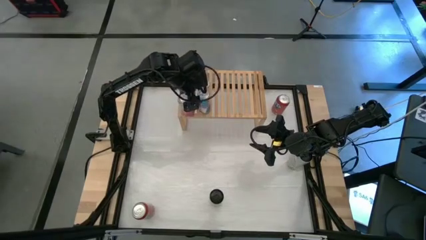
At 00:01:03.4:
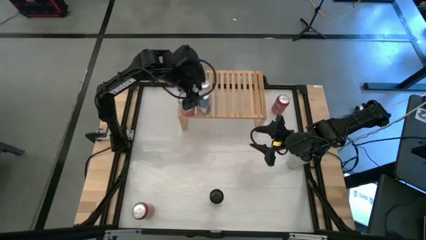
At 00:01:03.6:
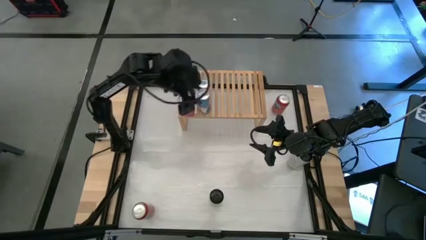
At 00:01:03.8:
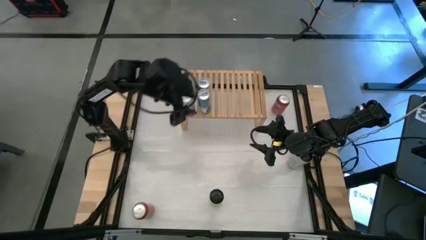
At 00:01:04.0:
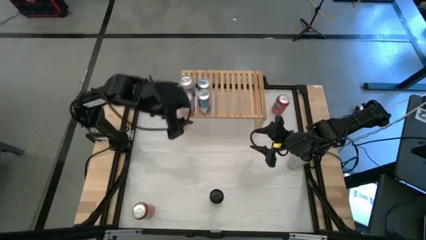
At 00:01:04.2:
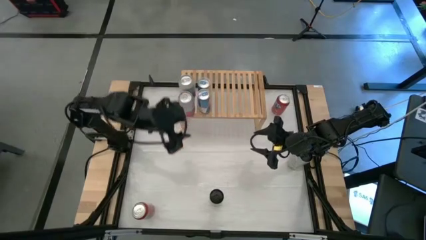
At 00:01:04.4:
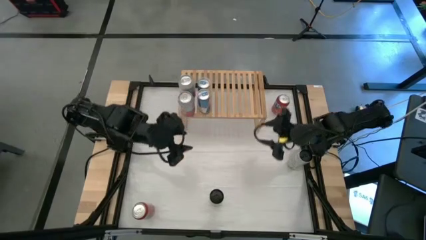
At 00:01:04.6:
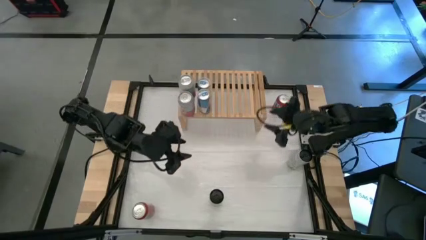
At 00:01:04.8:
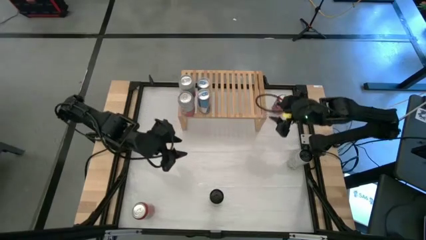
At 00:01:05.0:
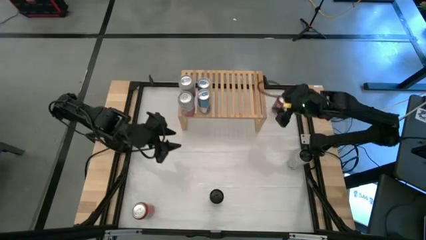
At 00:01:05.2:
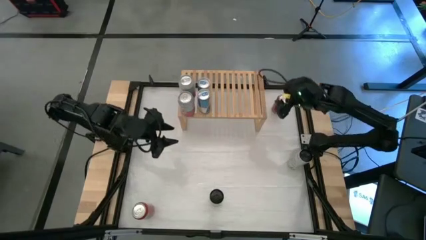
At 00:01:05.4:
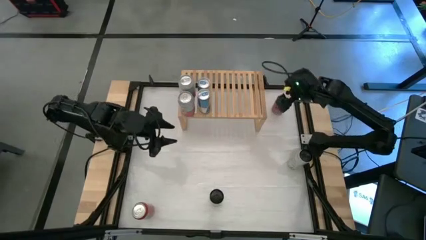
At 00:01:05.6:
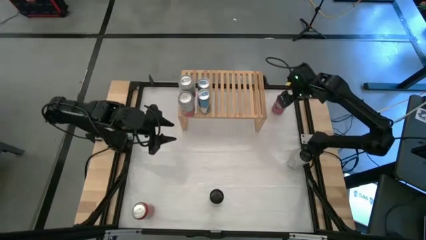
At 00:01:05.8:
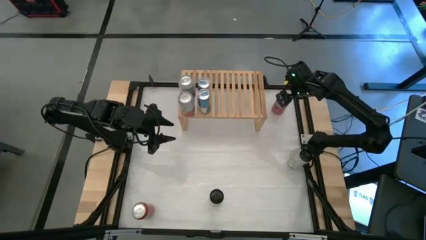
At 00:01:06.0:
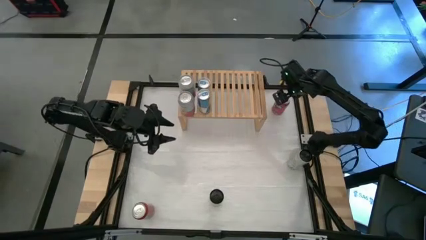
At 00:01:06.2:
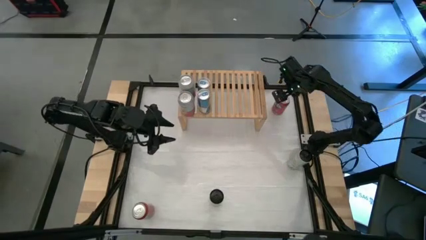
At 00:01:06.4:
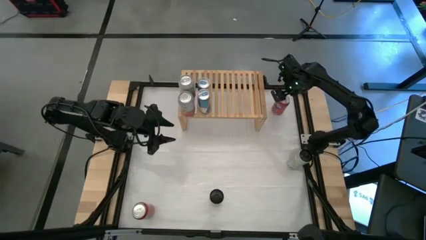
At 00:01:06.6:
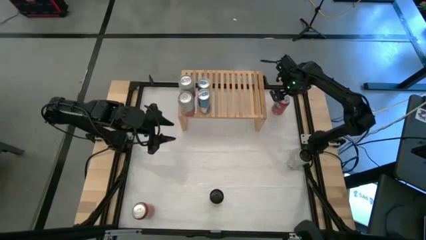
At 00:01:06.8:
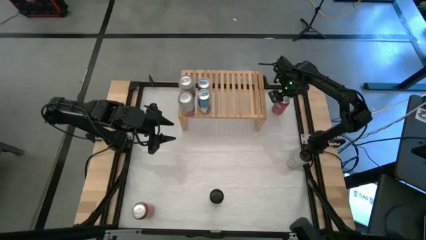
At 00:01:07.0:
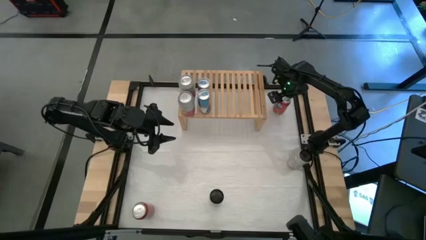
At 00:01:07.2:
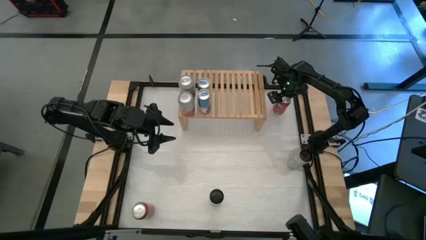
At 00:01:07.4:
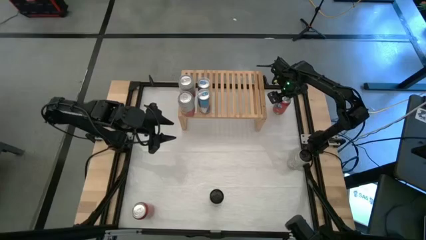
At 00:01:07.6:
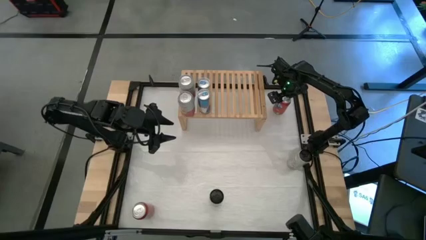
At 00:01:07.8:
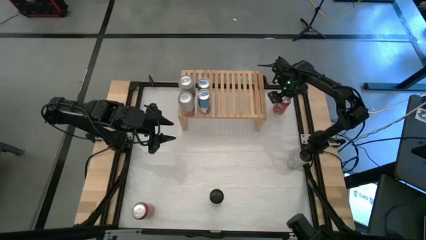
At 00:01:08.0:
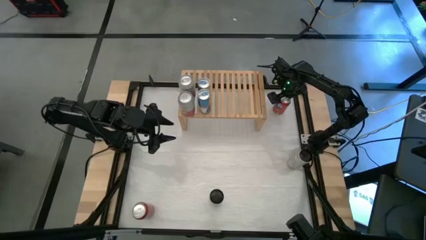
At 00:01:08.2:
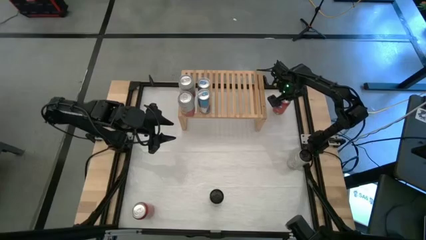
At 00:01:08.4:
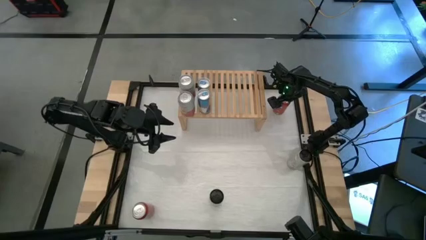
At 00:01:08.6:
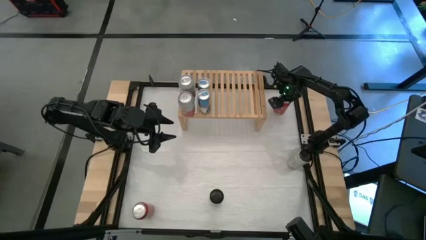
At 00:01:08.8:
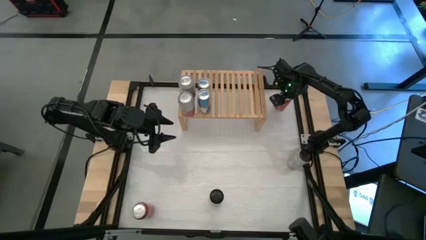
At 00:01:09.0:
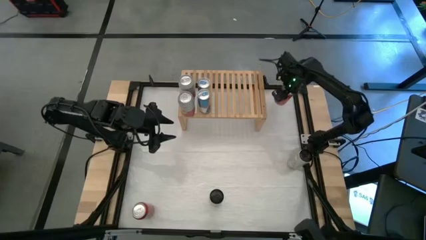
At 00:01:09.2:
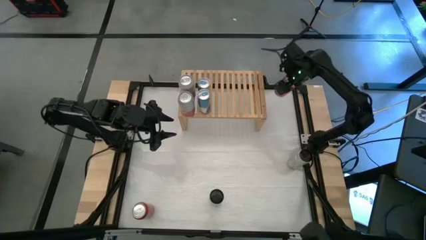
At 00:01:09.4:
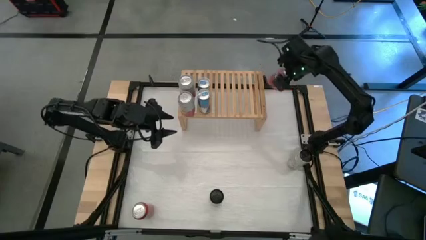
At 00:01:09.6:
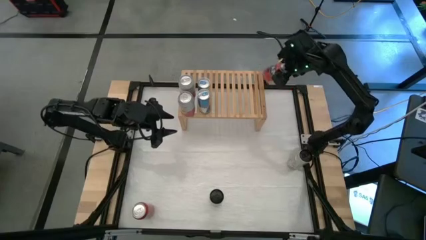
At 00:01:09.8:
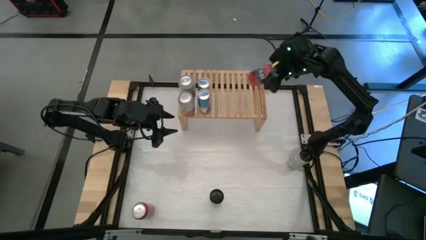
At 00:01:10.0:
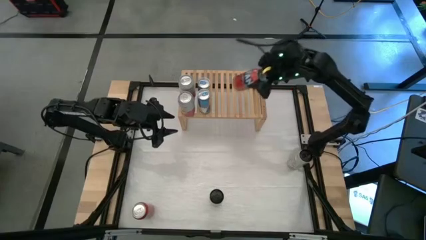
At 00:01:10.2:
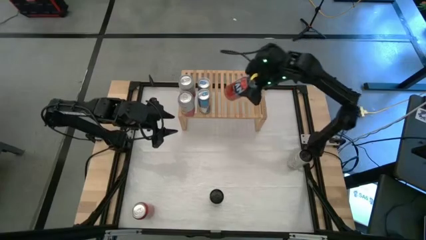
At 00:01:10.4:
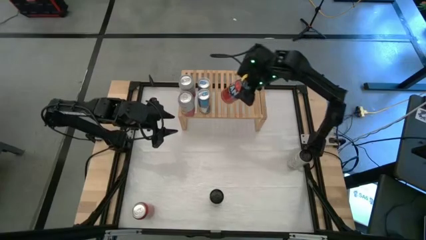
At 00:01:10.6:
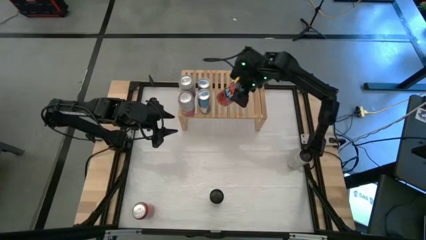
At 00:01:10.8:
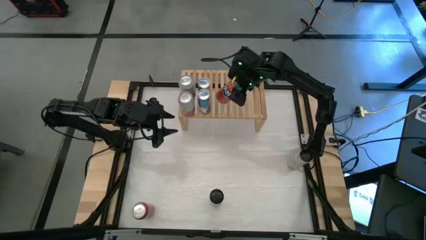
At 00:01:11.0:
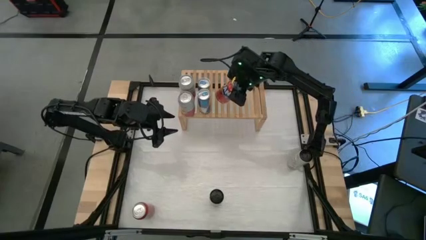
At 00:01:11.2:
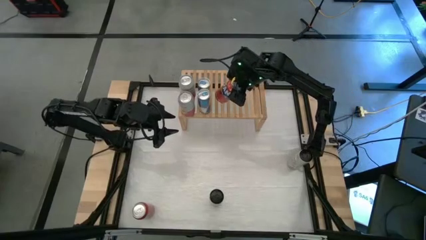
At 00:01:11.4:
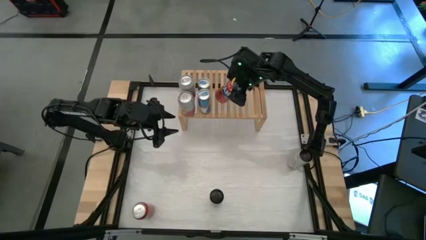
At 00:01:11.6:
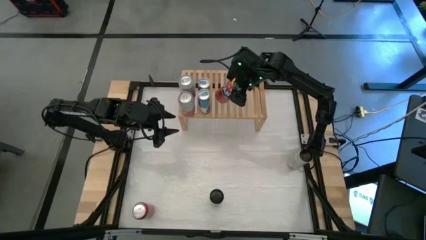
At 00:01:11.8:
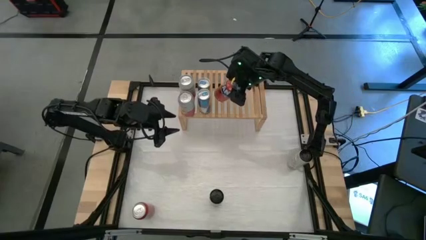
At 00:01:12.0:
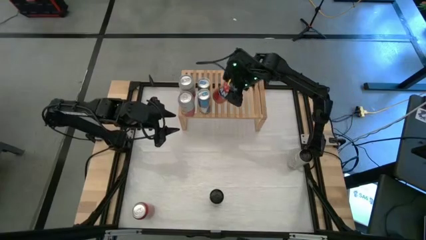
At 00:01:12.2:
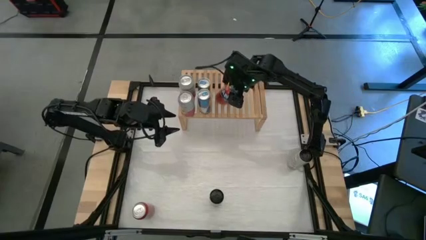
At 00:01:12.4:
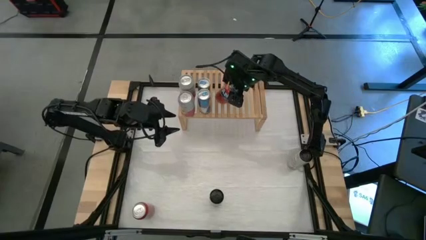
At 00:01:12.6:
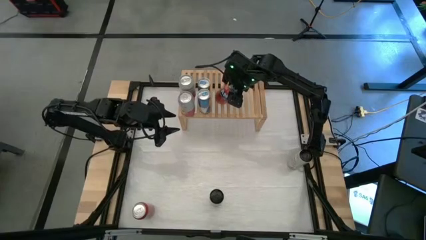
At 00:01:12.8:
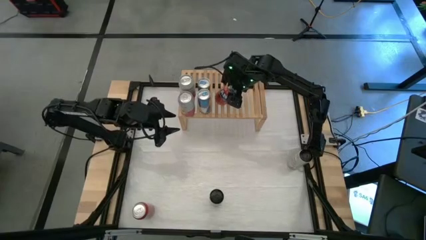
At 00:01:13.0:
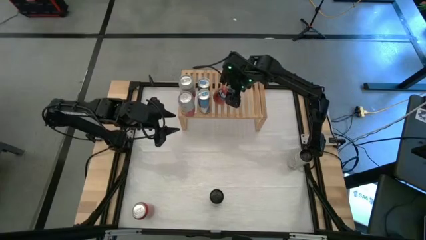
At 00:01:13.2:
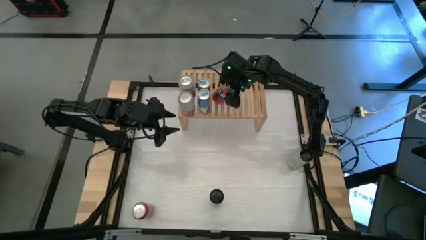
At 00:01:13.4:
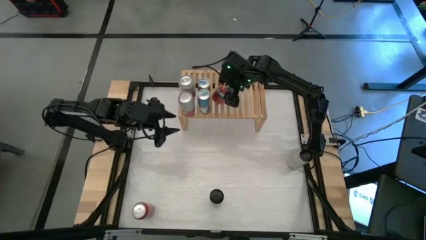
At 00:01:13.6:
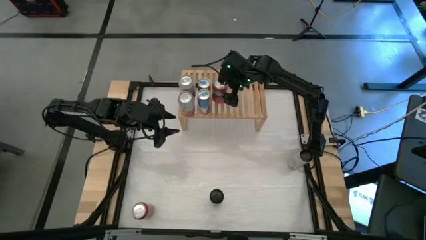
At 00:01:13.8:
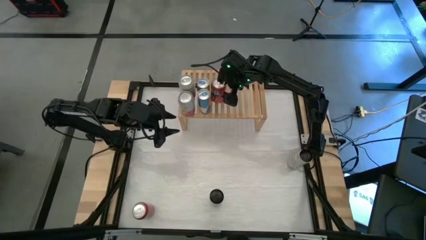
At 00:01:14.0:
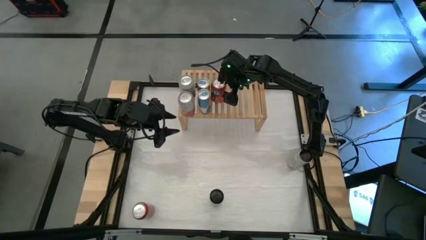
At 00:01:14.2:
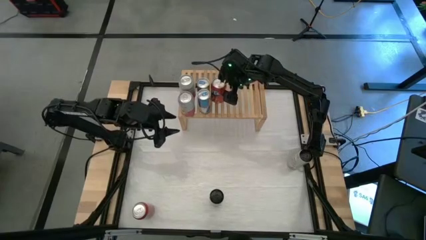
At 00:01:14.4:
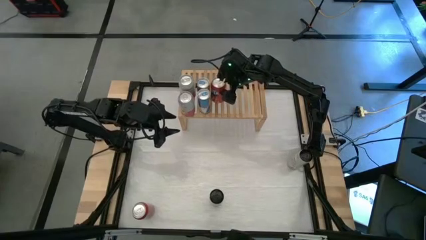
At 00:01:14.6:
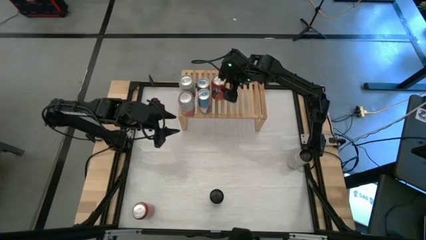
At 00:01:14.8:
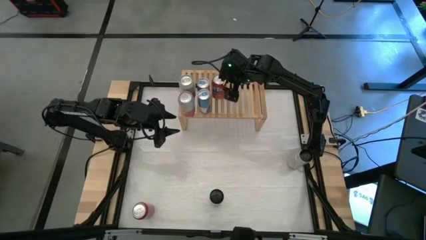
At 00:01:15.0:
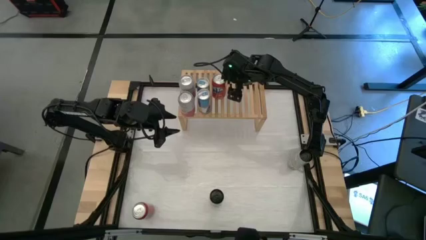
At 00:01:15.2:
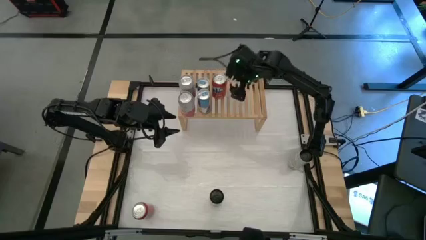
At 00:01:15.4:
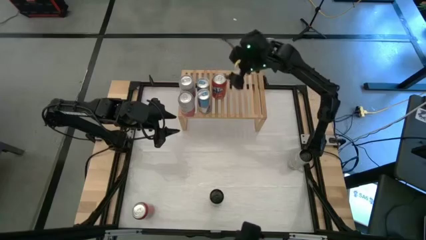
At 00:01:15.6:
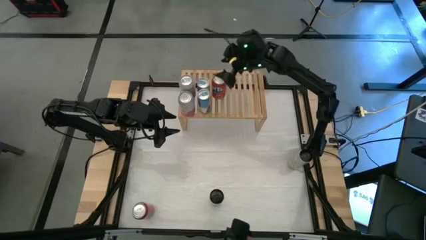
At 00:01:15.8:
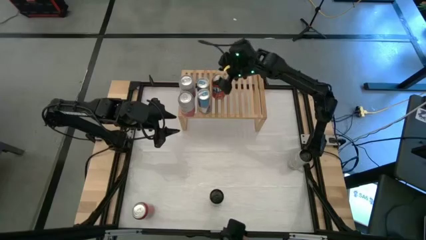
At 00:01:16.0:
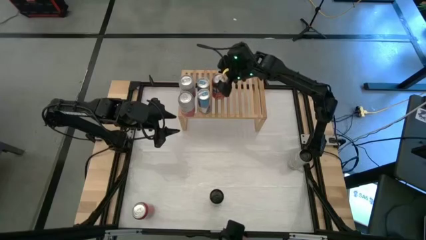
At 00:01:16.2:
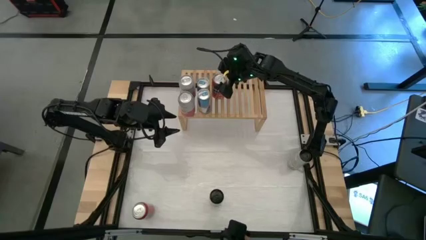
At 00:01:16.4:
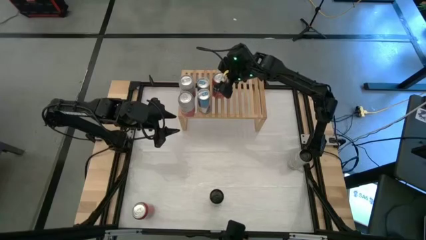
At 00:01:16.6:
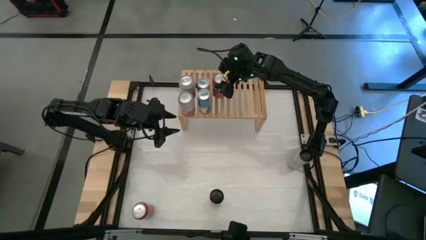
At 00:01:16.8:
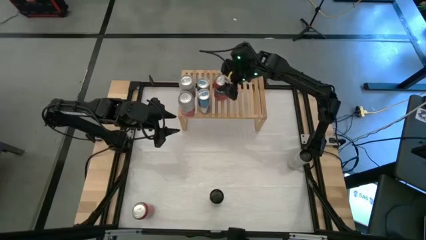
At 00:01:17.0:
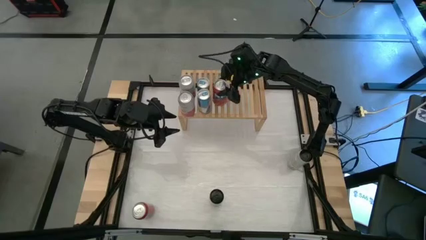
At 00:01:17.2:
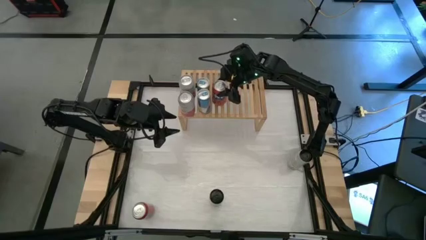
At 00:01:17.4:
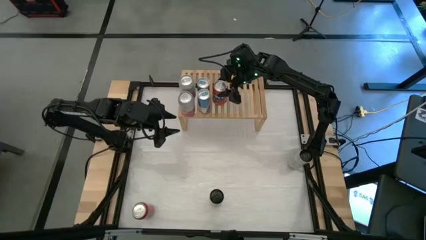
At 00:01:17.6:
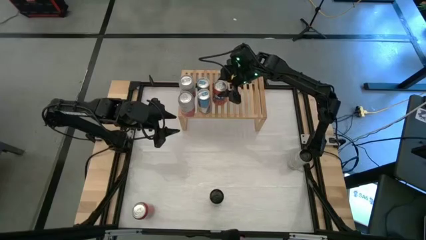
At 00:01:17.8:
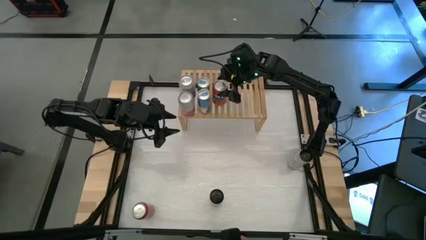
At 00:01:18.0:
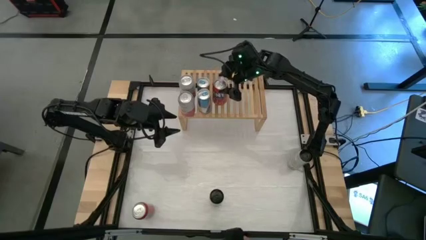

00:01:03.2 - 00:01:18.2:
Task: Place canned beverage on shelf
Put the top red soda can on the shelf
